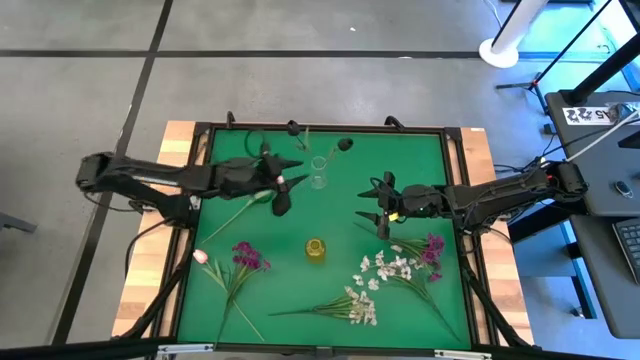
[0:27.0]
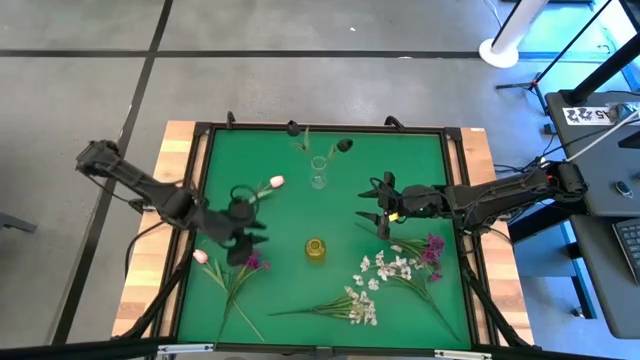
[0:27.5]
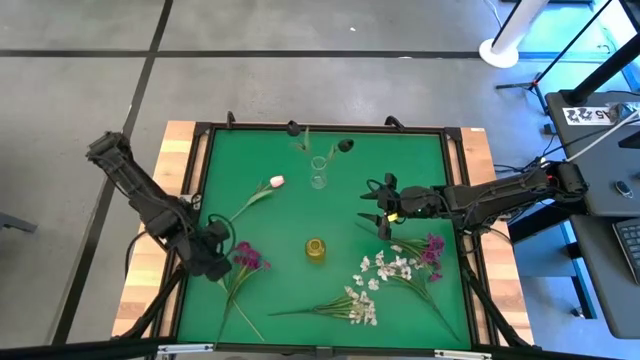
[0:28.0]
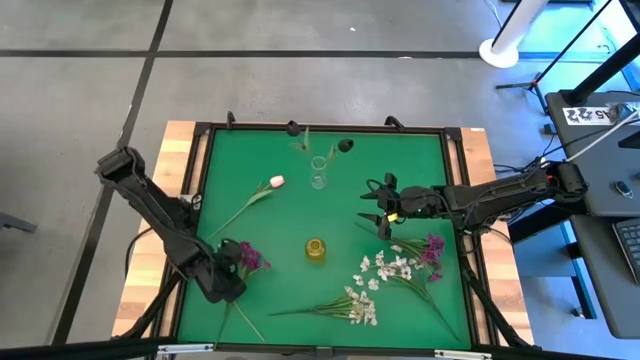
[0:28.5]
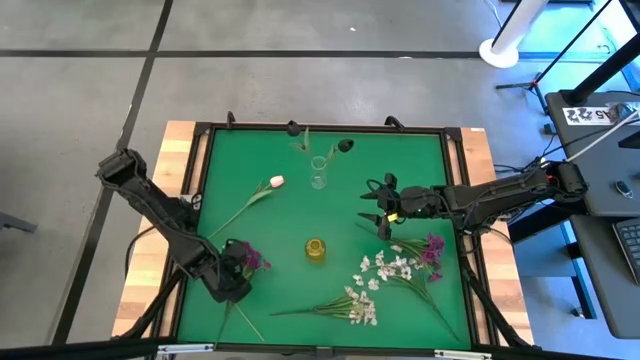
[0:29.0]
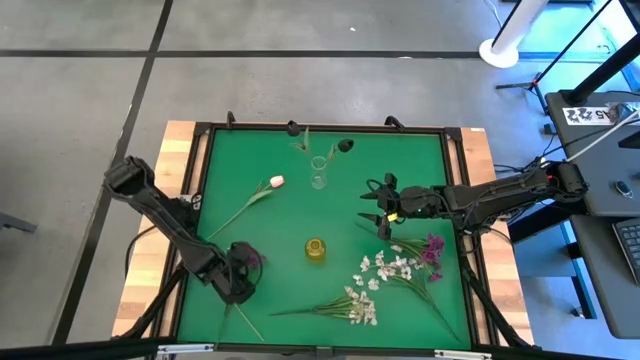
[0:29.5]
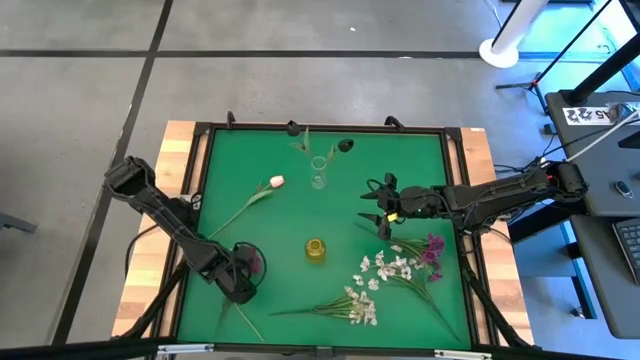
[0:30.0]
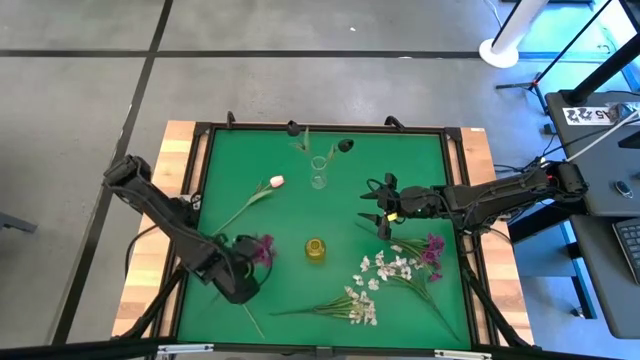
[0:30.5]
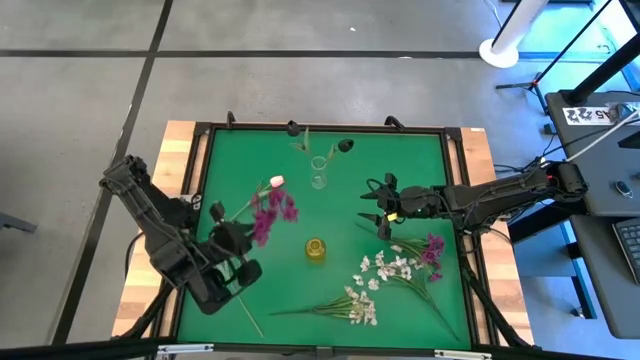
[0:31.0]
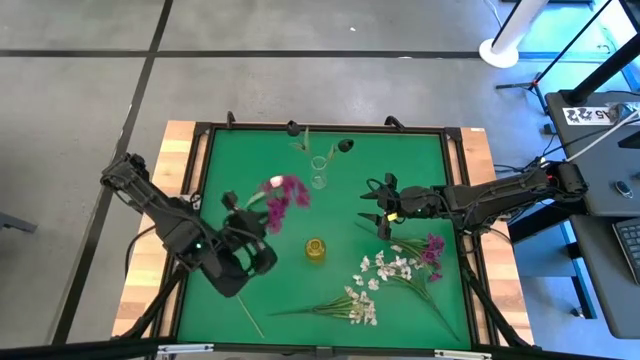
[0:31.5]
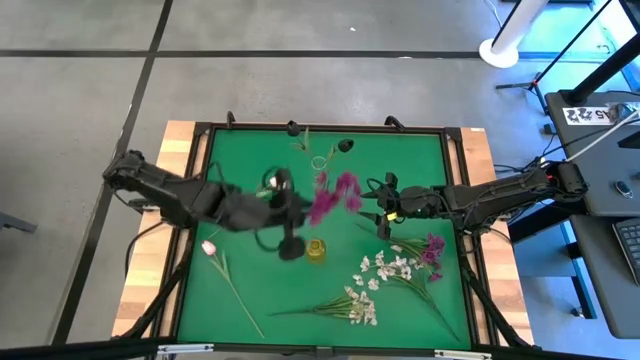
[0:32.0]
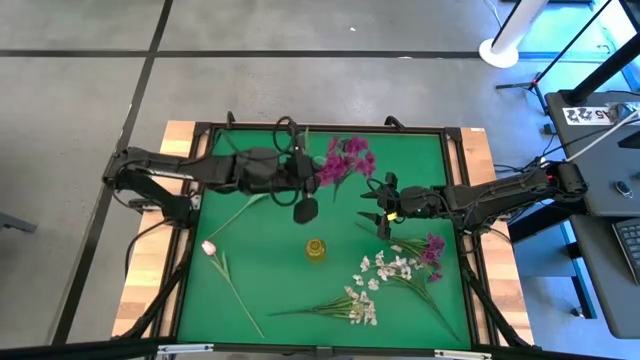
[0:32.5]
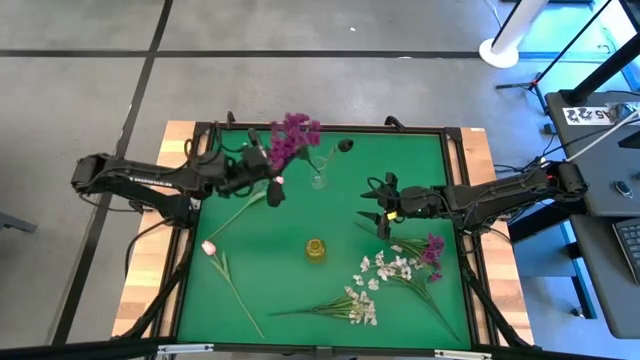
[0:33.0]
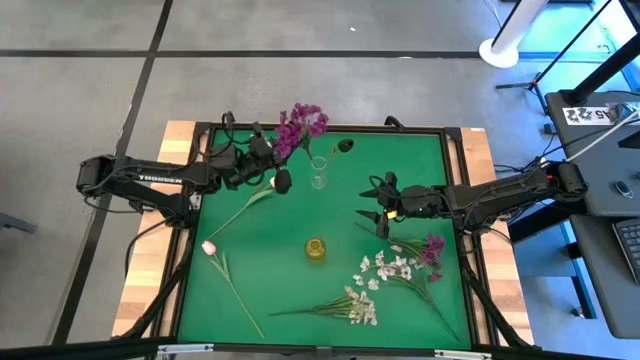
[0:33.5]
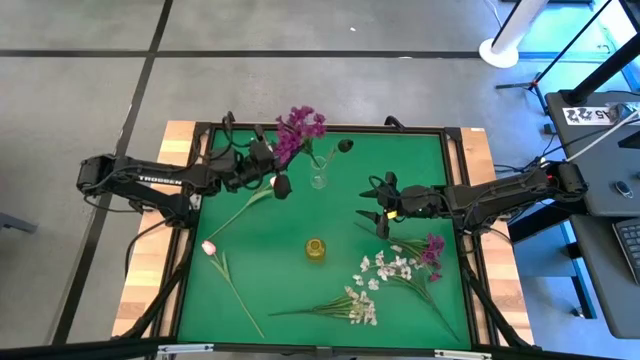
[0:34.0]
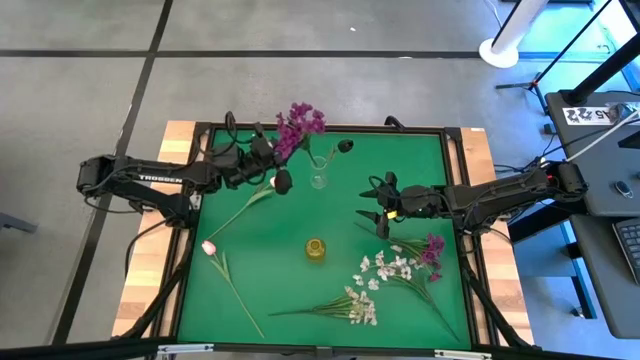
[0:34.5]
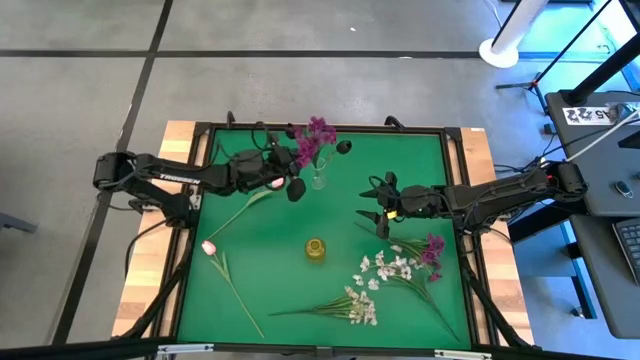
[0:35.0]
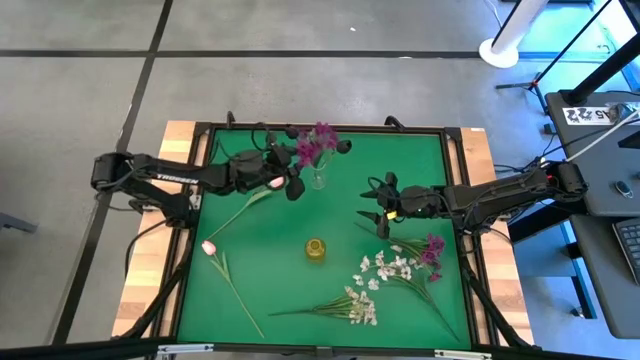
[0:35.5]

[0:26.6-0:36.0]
Task: Sort flowers into vase by color
Put the left purple flower into the transparent vase

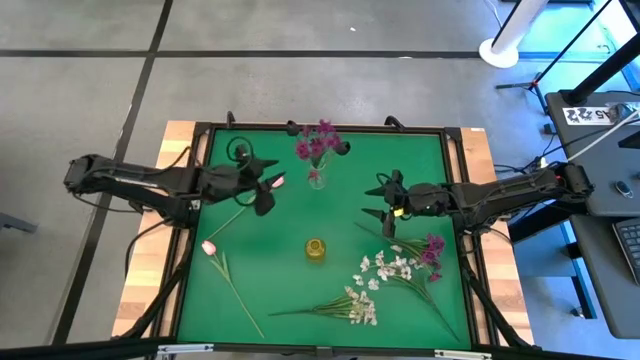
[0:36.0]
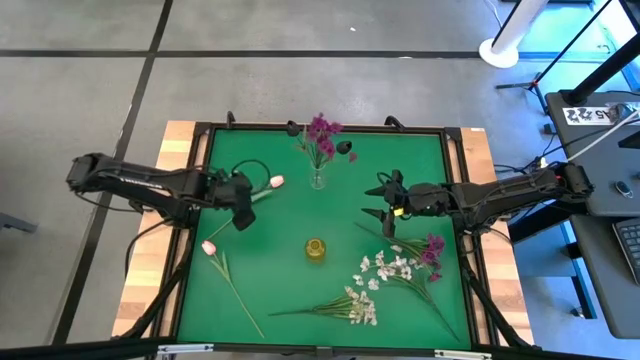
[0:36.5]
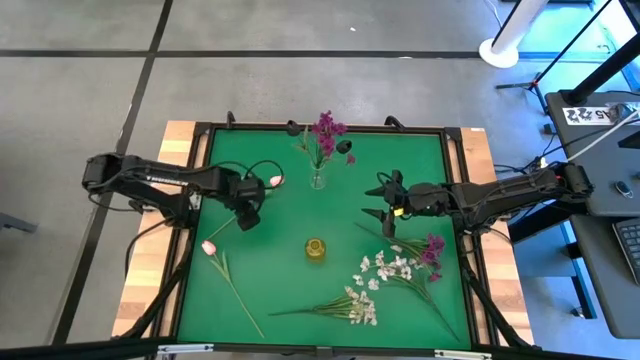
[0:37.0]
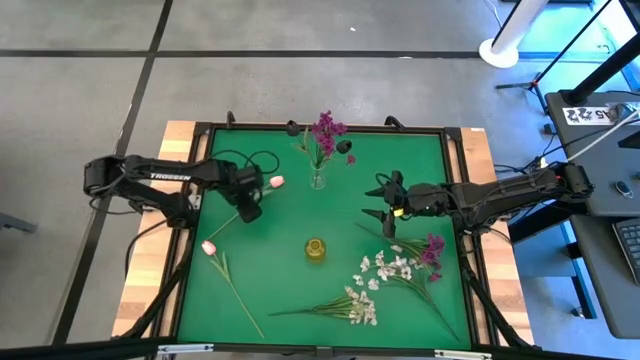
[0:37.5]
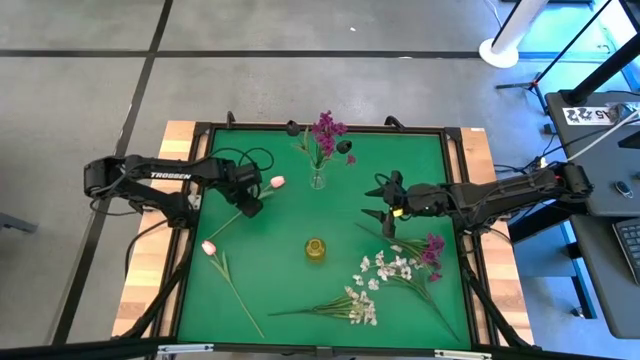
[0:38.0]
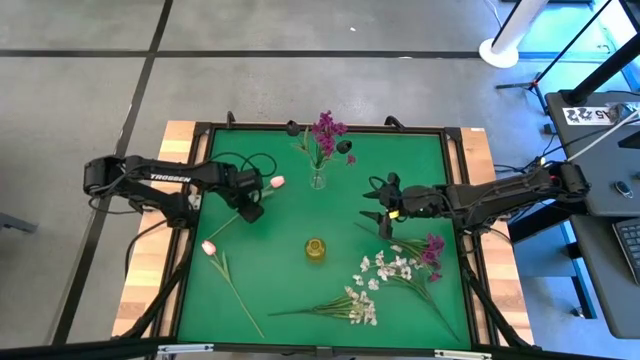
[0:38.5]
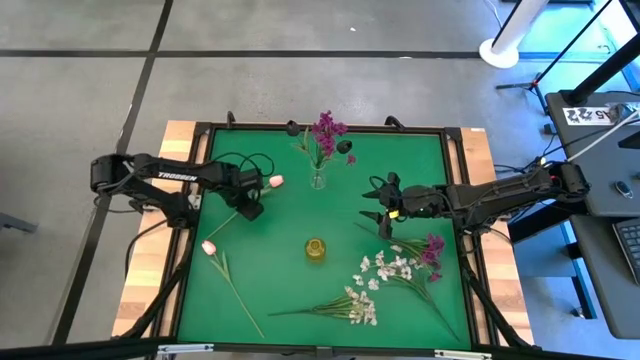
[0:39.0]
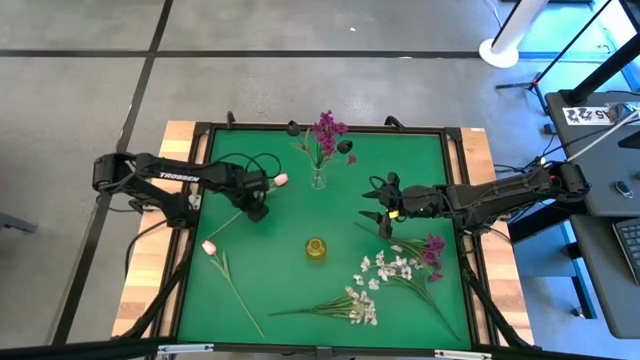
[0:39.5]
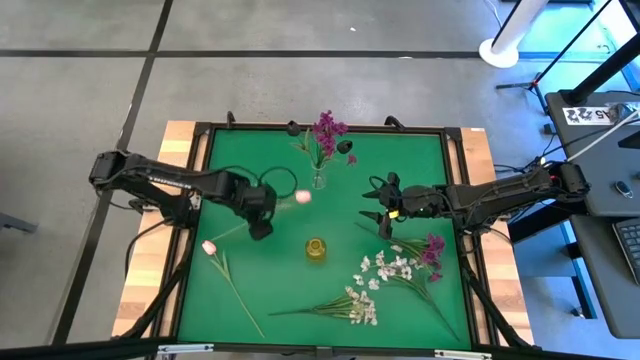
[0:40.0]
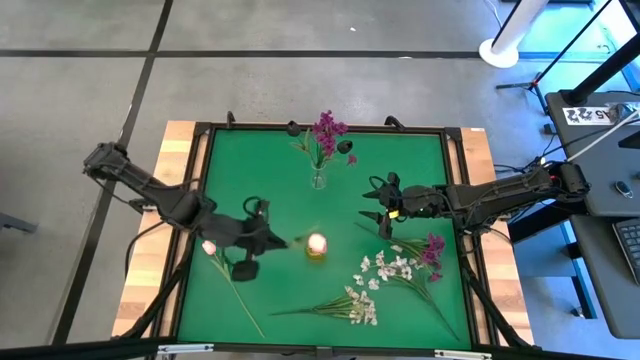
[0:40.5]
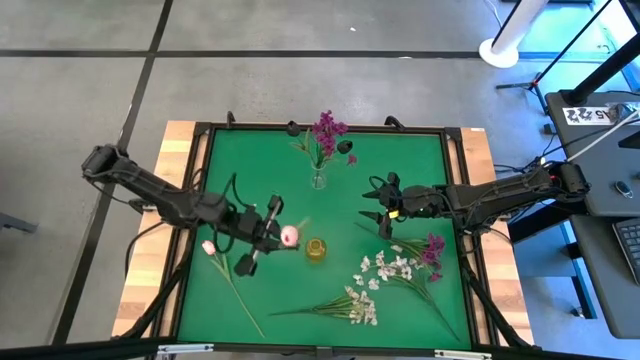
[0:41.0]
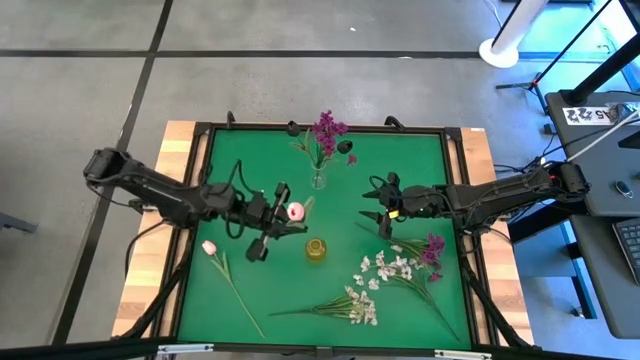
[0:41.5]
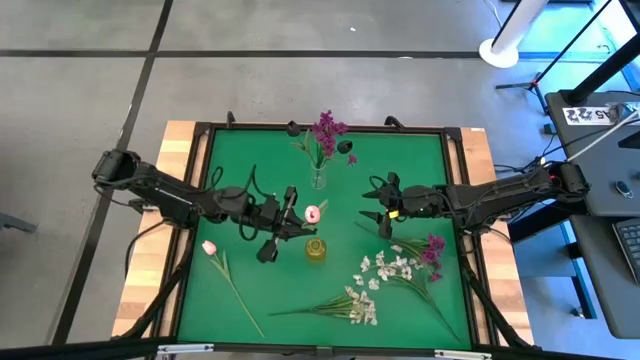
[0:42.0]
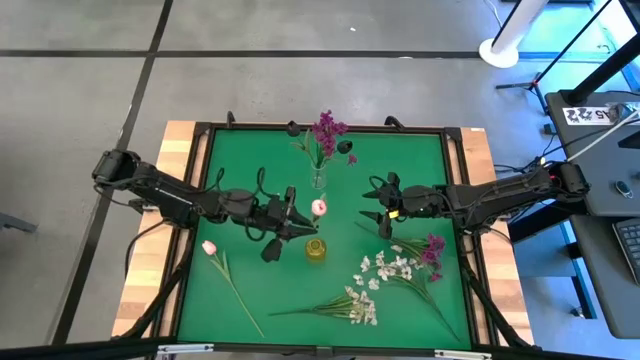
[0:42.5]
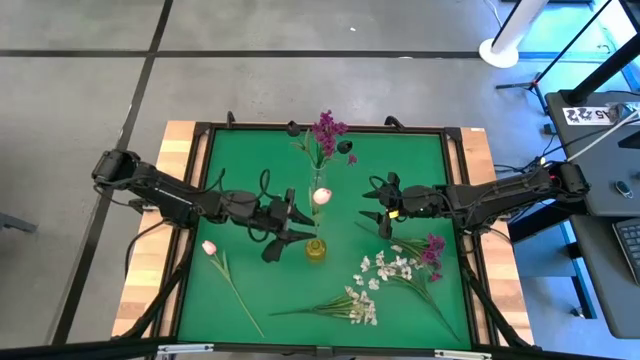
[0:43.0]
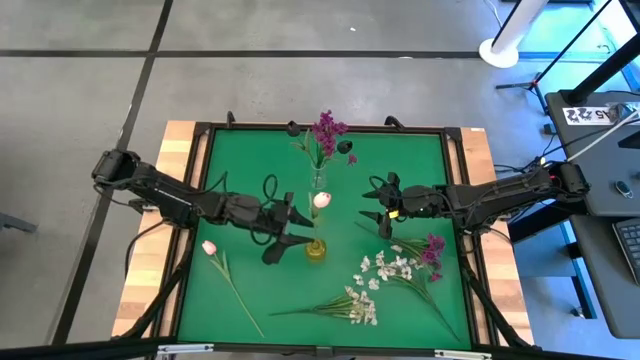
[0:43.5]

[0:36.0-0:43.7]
Put the top pink tulip into the yellow vase

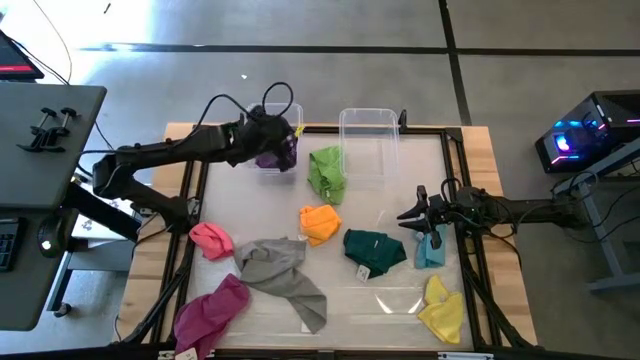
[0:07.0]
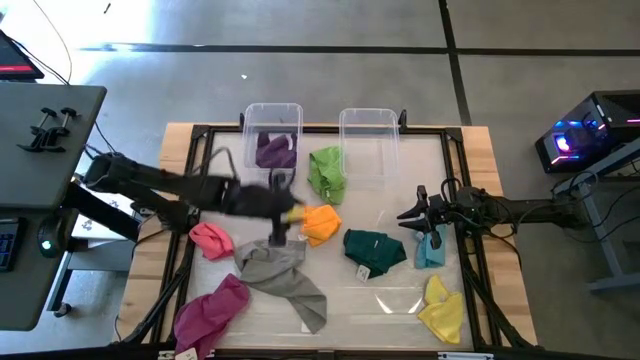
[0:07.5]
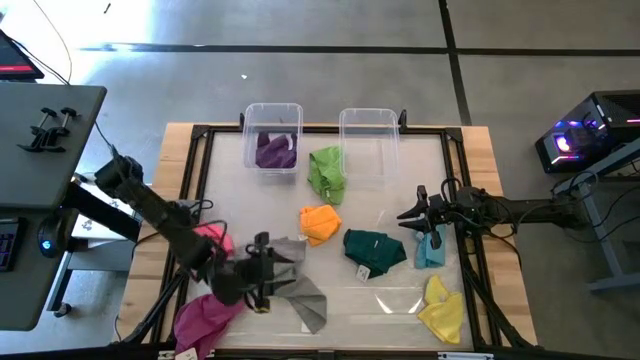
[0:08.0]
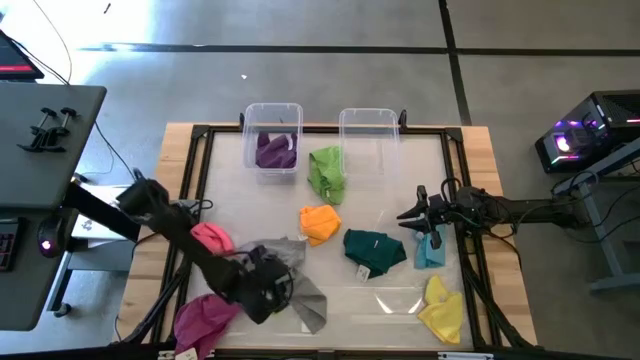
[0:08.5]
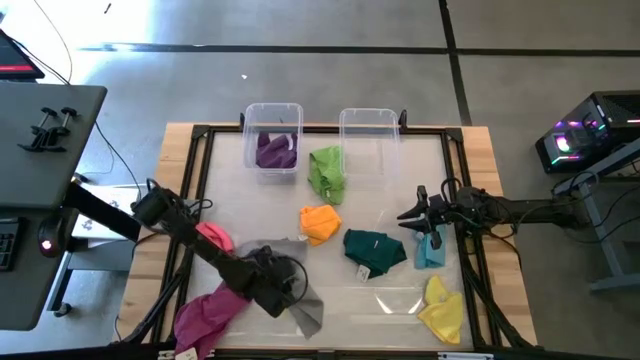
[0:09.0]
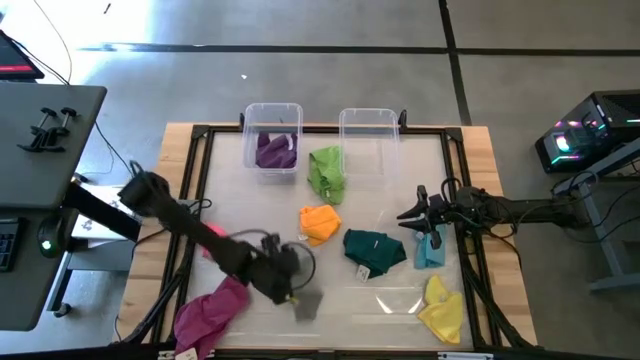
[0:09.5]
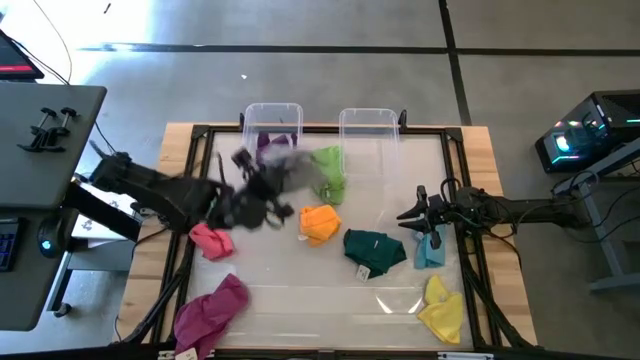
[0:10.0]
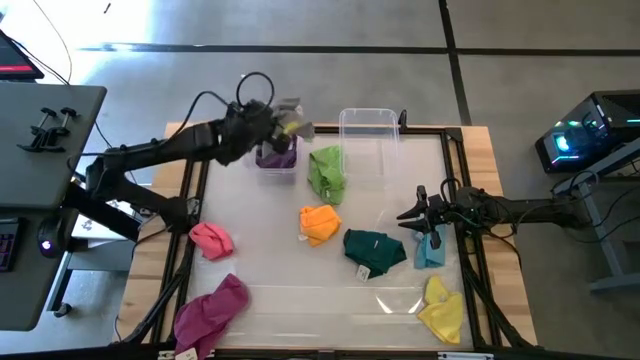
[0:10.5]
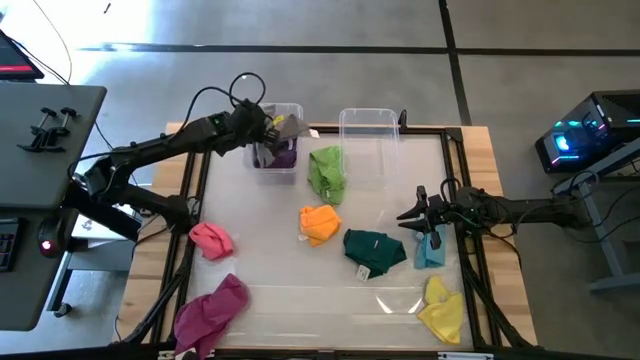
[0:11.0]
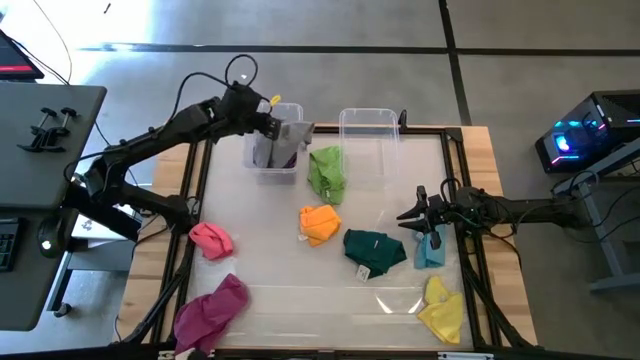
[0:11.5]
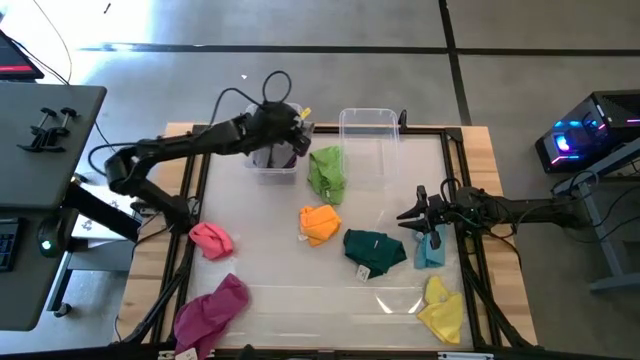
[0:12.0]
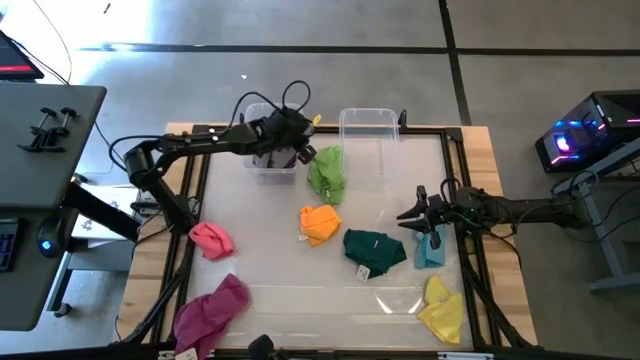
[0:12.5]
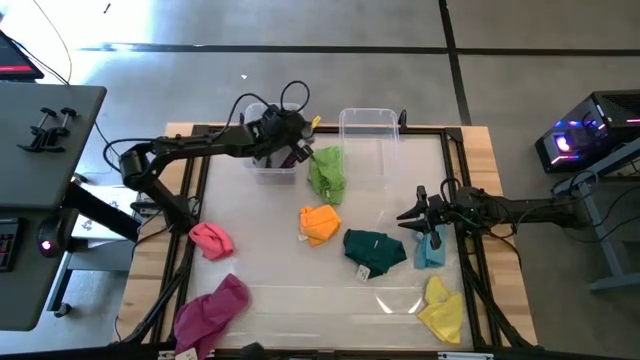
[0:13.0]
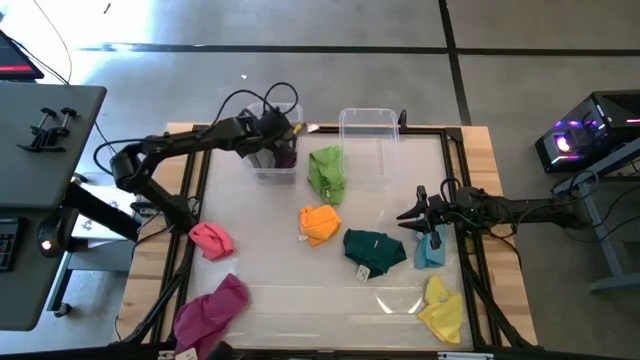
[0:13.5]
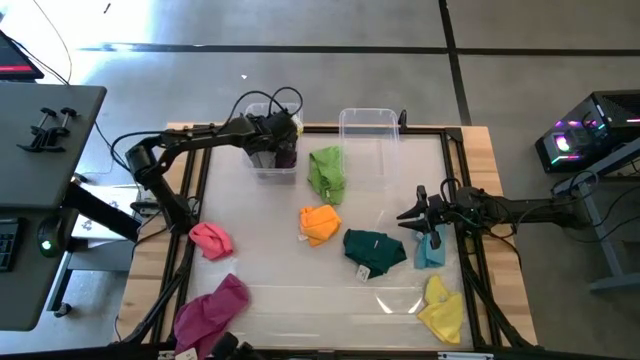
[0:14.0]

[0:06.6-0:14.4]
Task: Sort towels by color in basket
Put the gray microfiber cloth into the left transparent bin
